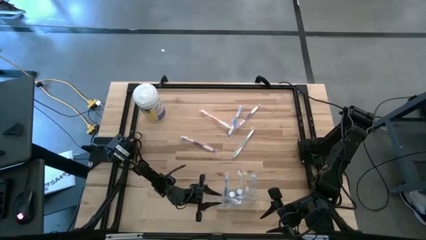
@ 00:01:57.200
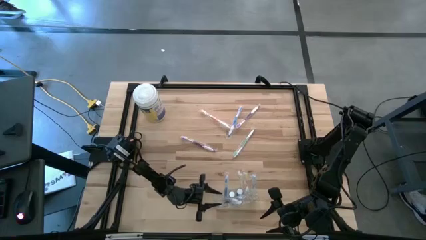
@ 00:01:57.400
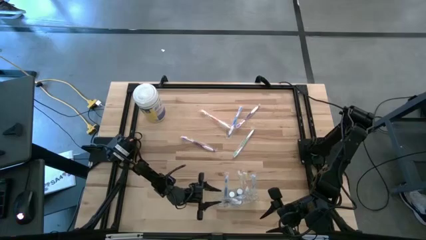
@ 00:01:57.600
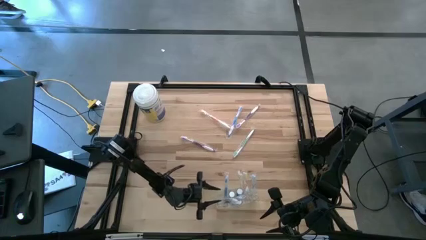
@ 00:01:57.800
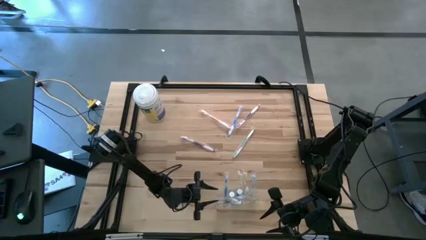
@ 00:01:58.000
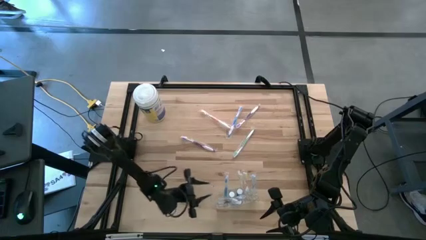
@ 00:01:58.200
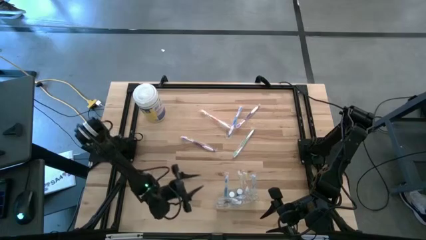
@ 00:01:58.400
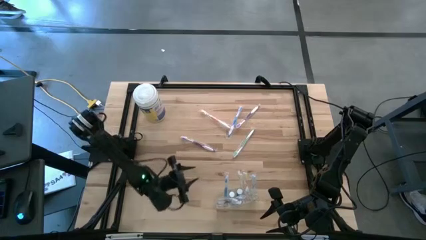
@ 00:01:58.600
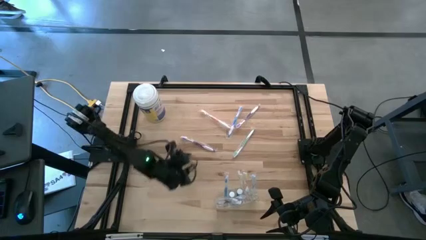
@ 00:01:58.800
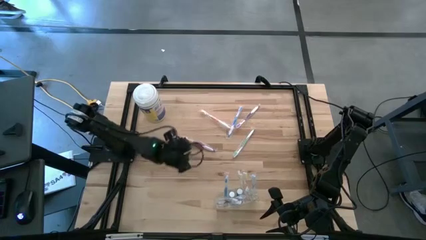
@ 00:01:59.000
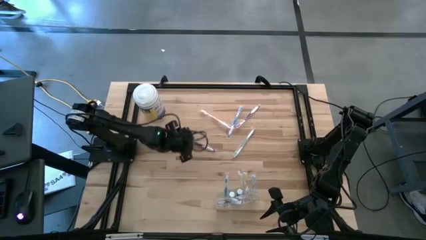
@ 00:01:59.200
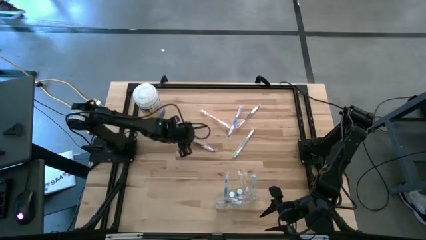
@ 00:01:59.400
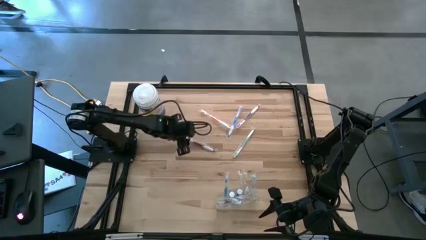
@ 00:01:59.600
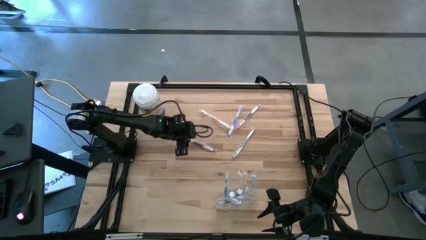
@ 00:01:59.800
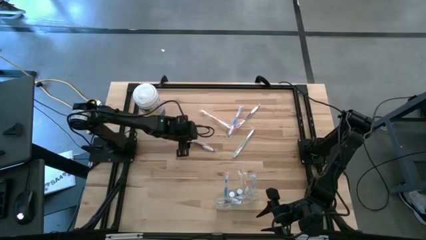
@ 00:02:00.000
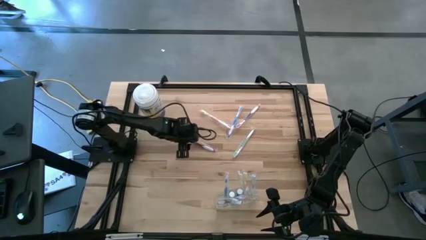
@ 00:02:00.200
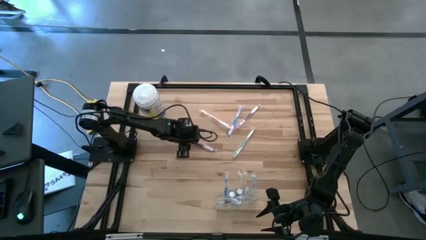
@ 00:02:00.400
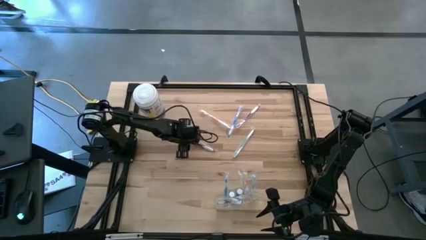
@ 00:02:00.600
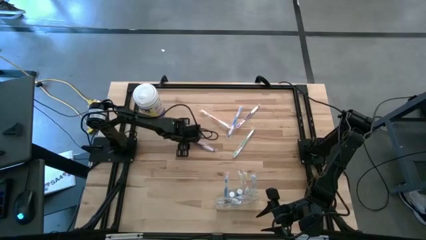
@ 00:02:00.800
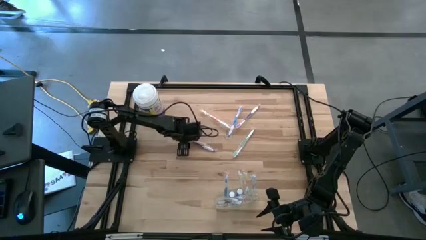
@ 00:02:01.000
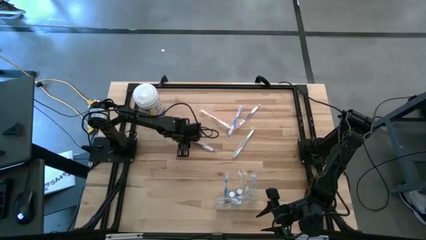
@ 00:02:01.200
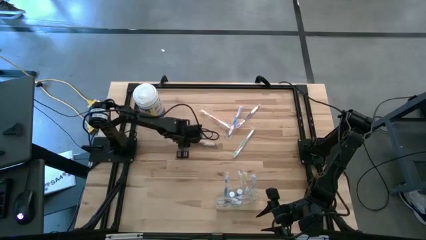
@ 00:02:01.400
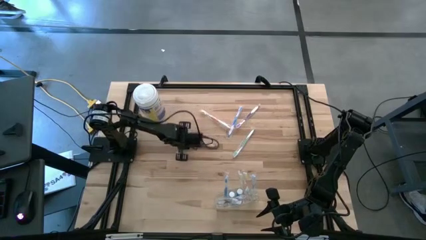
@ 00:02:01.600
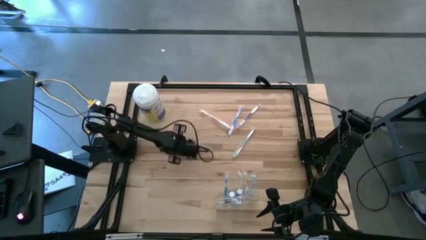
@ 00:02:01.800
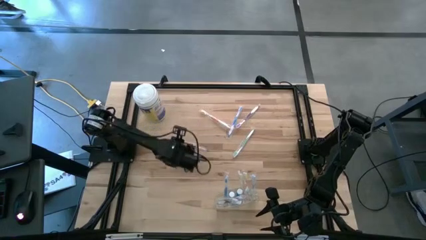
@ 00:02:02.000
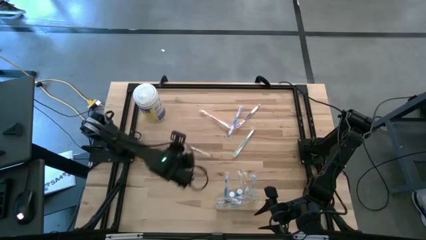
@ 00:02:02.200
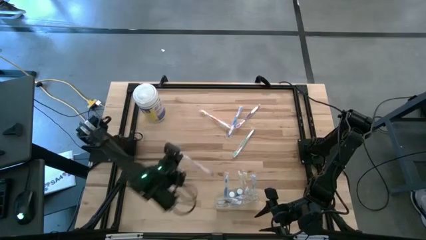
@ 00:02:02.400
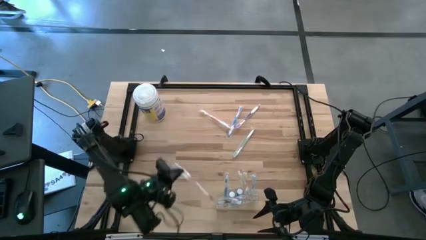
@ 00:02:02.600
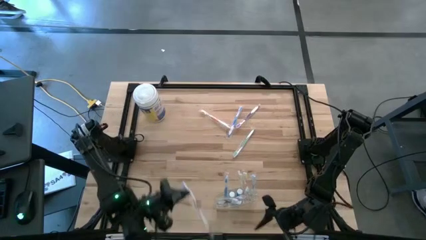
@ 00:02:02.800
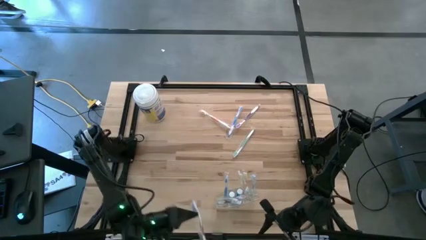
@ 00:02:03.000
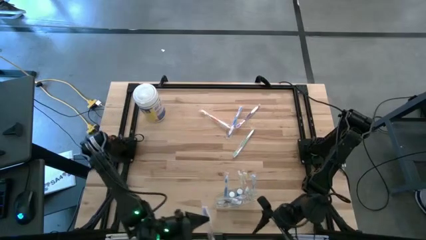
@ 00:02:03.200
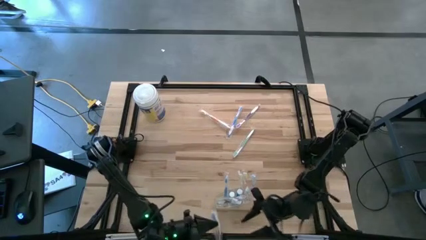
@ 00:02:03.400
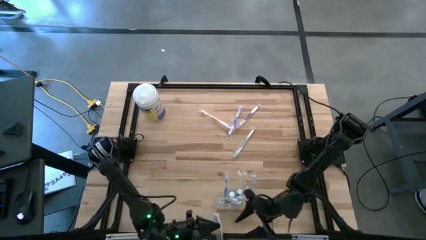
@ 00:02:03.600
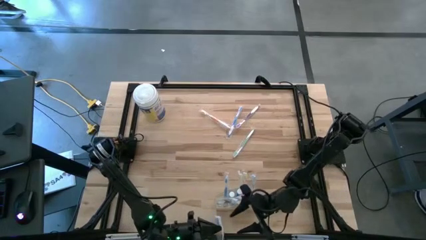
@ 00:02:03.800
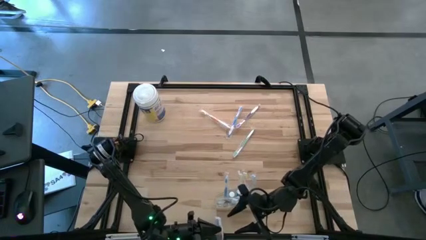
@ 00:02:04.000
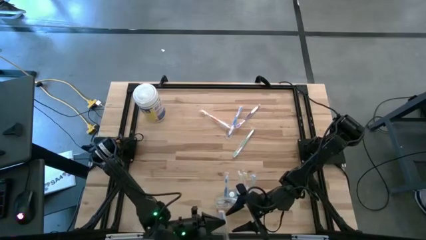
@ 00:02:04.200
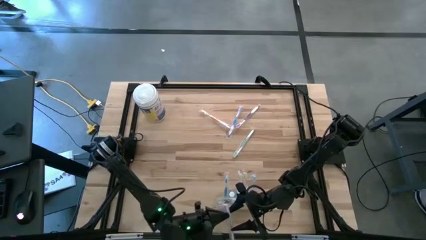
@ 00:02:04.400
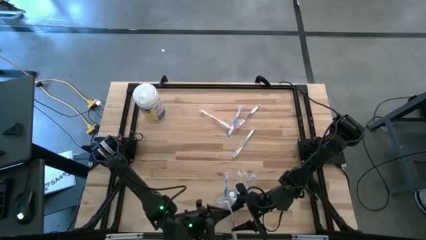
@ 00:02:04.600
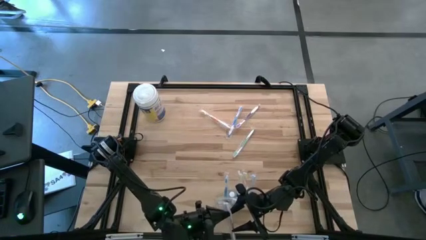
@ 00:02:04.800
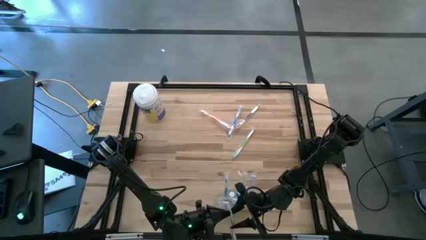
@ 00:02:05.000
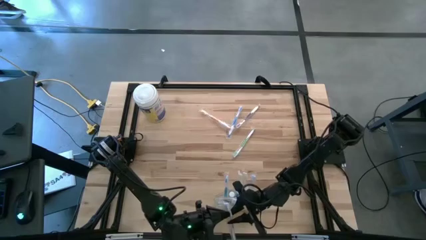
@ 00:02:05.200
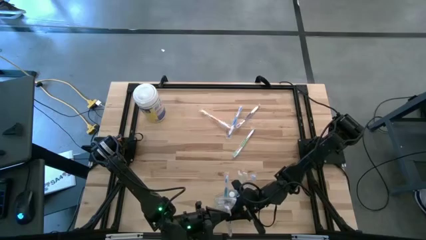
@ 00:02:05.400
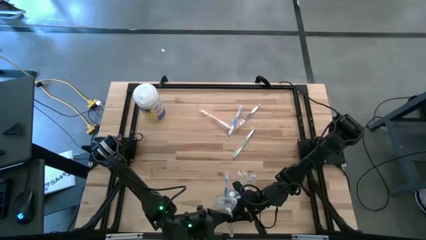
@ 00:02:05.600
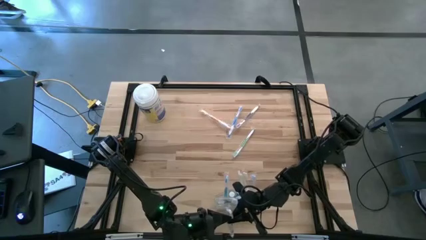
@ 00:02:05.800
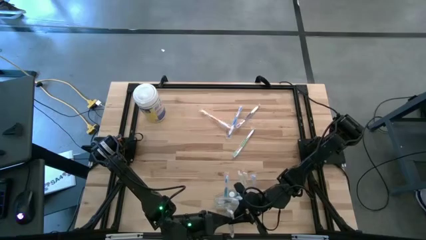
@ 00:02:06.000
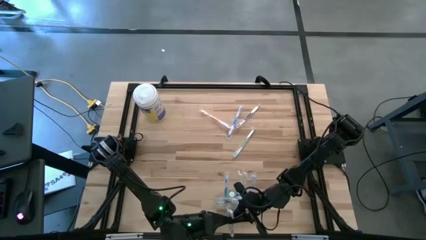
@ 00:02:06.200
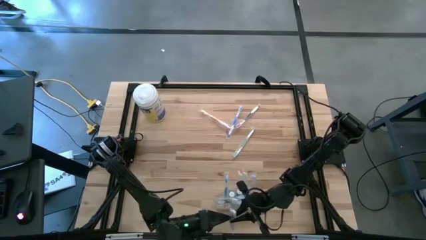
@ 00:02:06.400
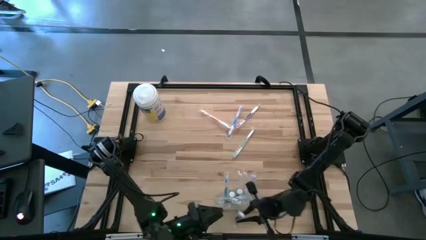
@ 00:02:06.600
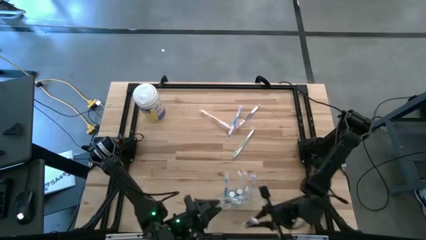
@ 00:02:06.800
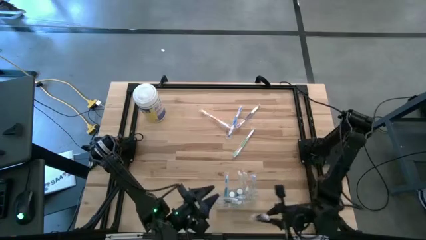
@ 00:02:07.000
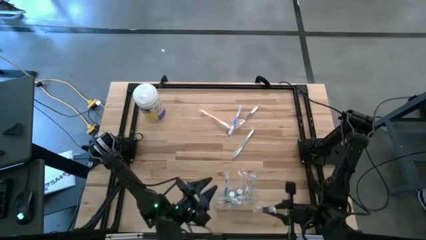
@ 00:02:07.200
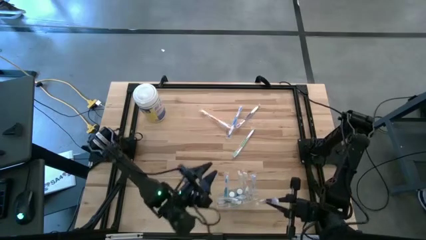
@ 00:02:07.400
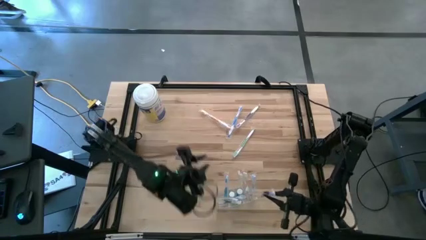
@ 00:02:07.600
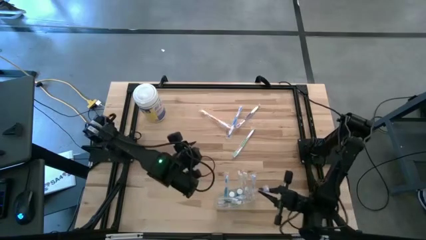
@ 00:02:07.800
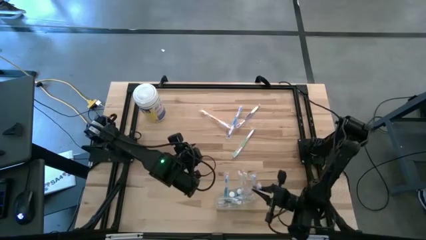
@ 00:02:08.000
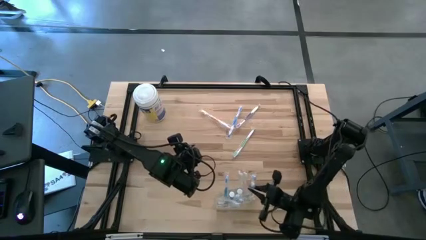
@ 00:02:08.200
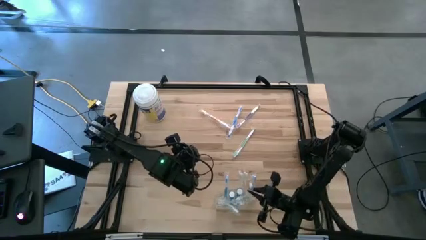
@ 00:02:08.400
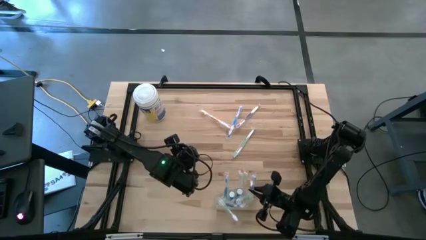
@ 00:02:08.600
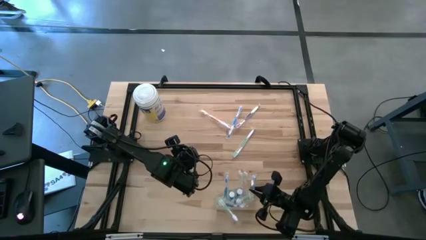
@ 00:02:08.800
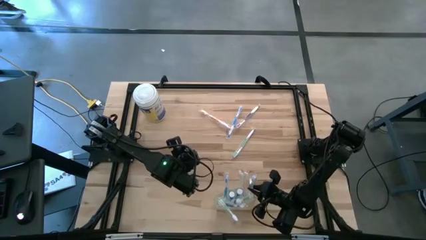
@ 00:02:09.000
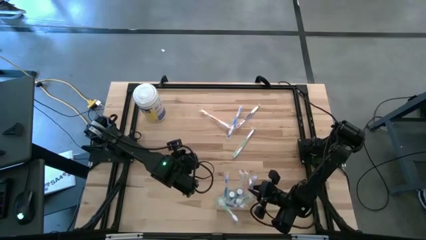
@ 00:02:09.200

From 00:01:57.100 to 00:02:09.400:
Task: Pick & Place toothbrushing station
Put the left purple toothbrush into the transparent bin
